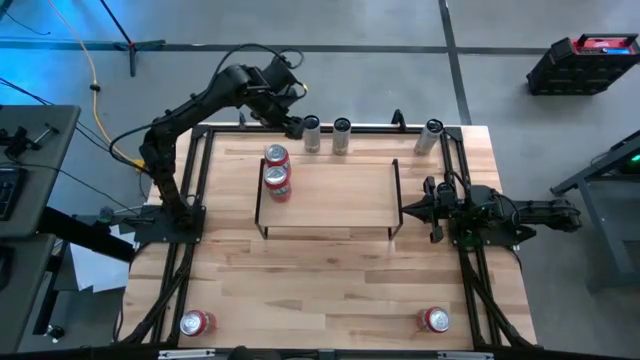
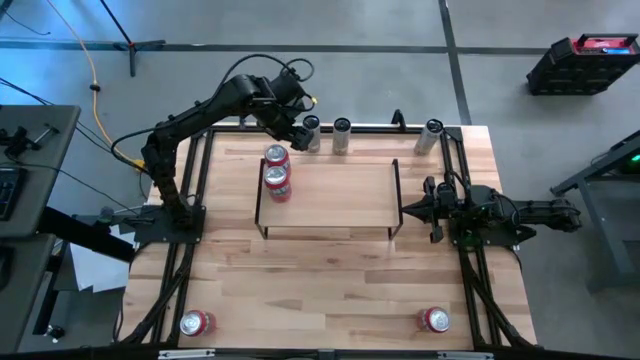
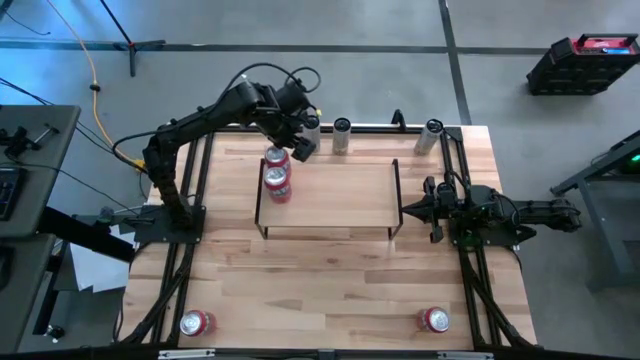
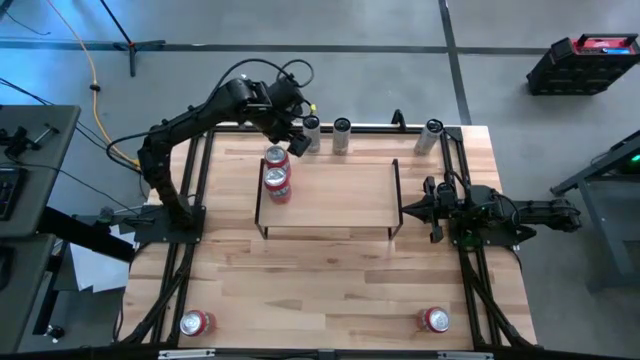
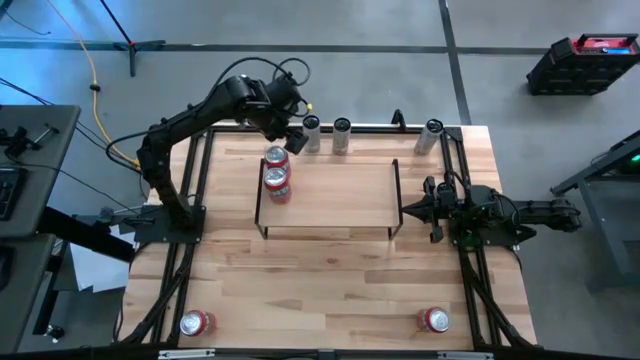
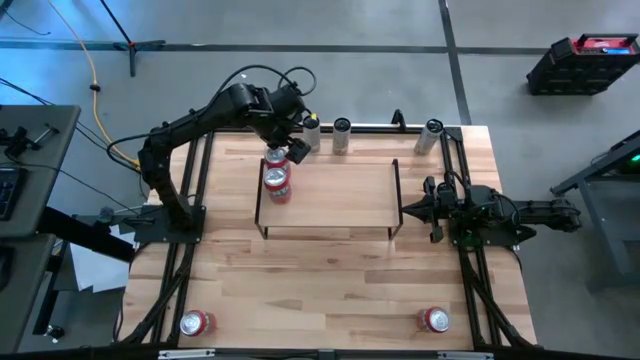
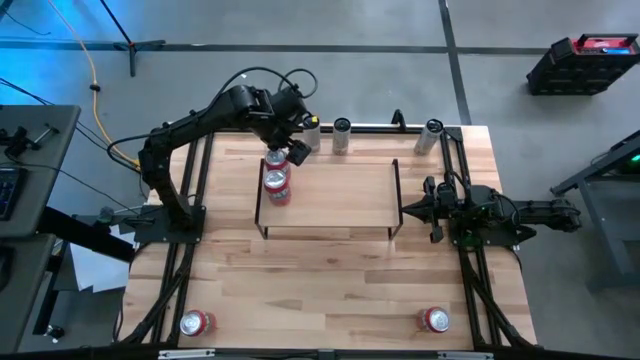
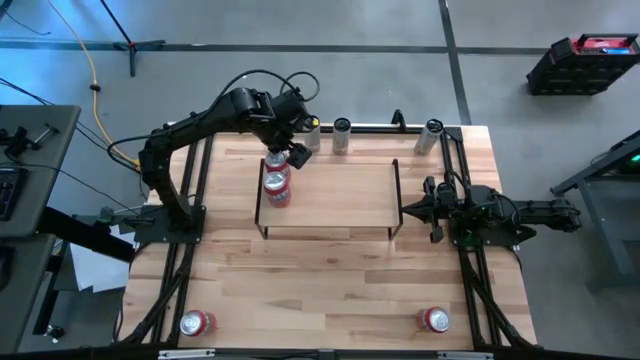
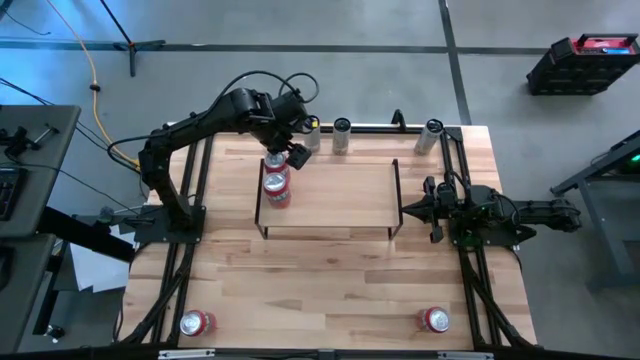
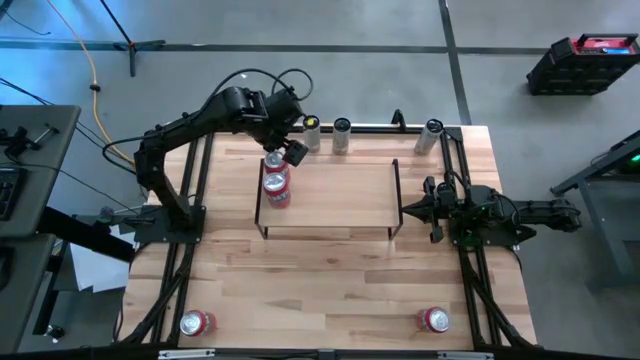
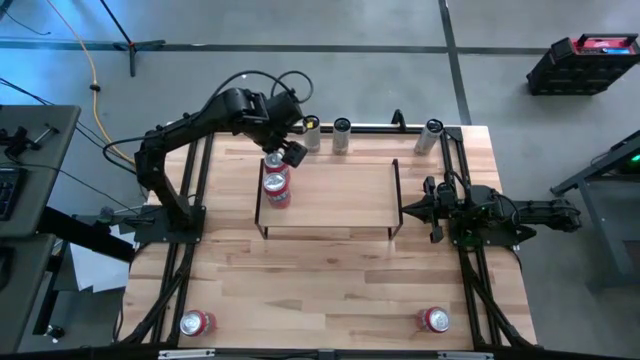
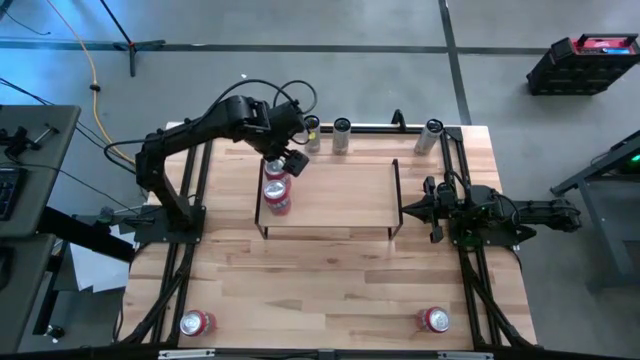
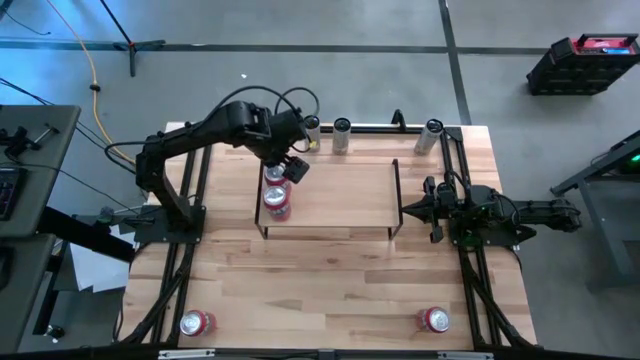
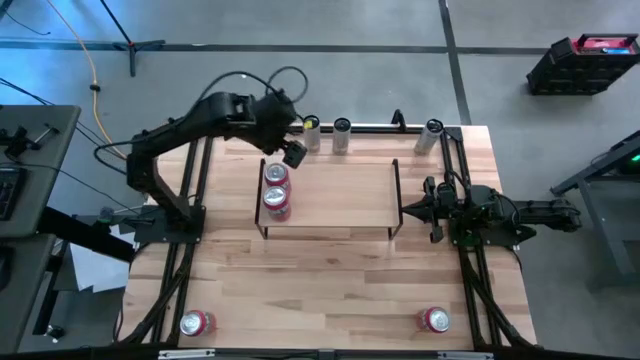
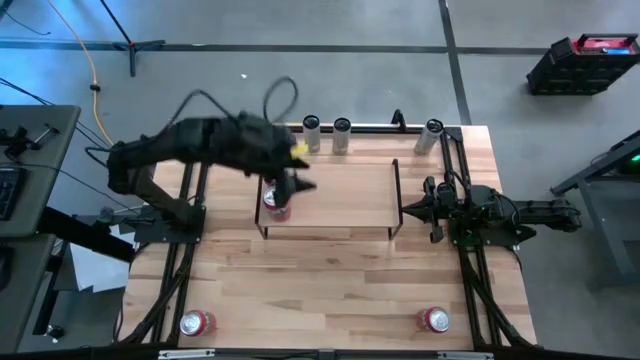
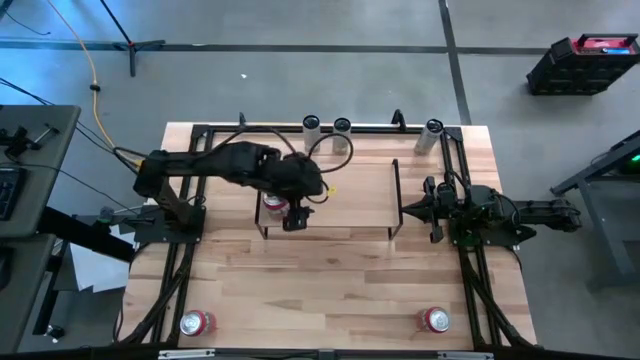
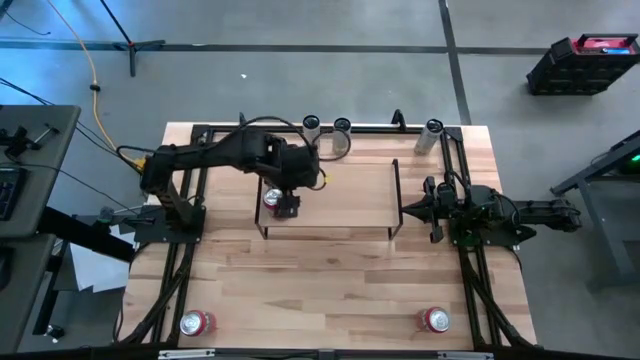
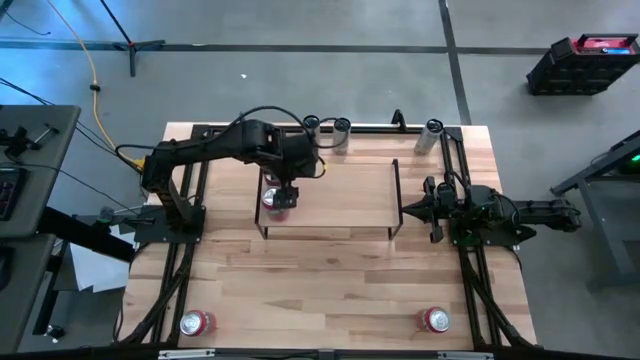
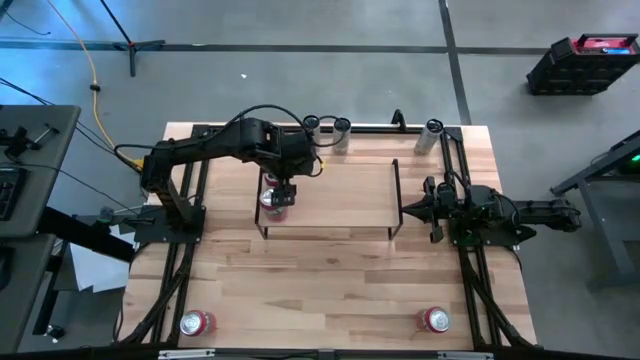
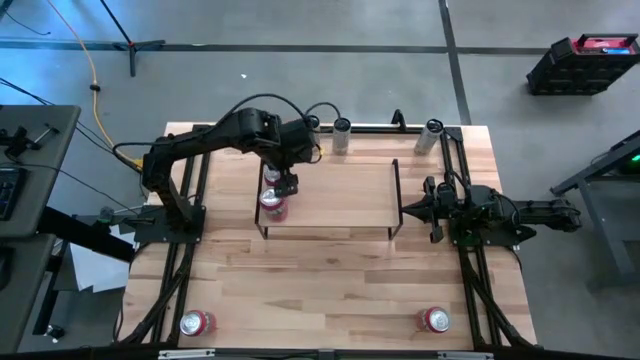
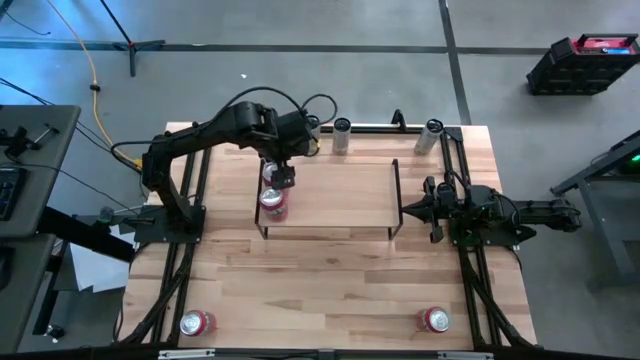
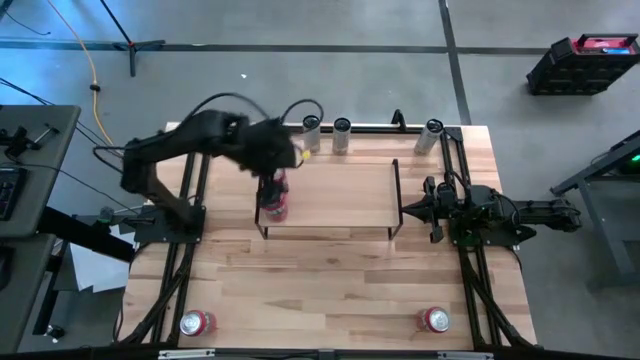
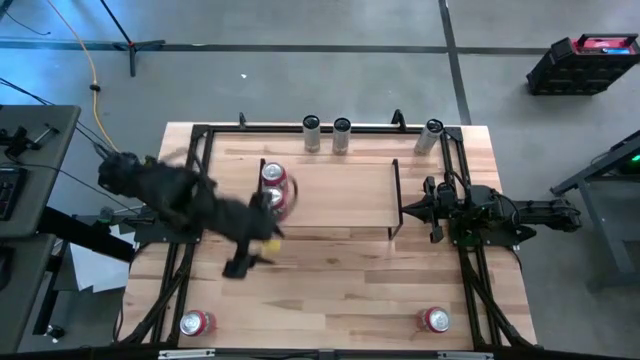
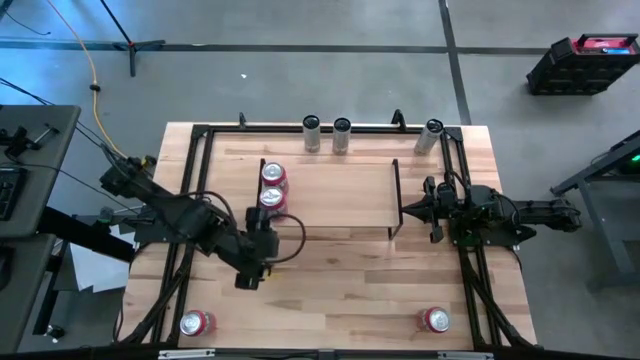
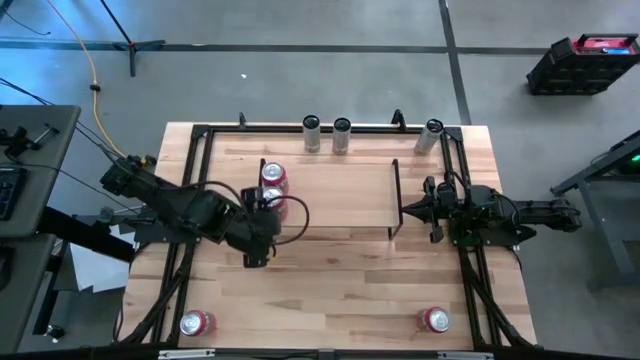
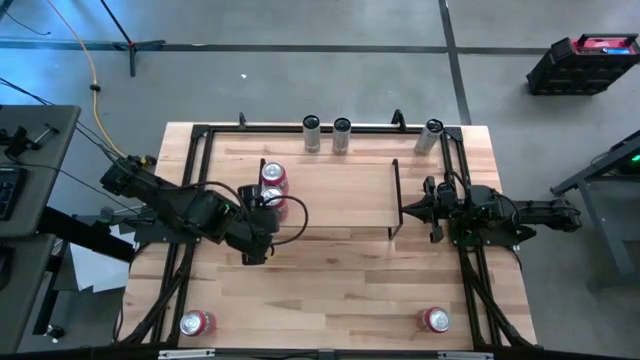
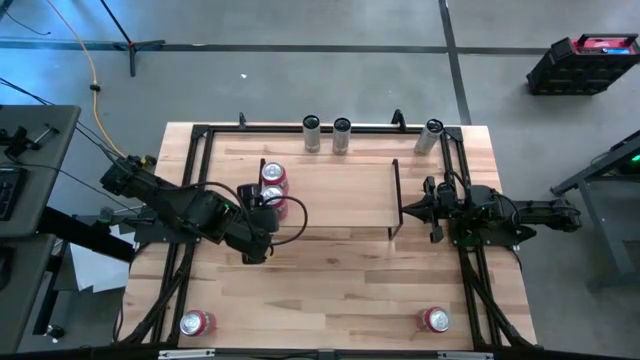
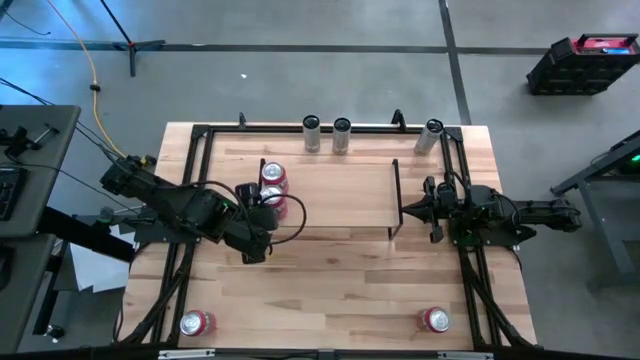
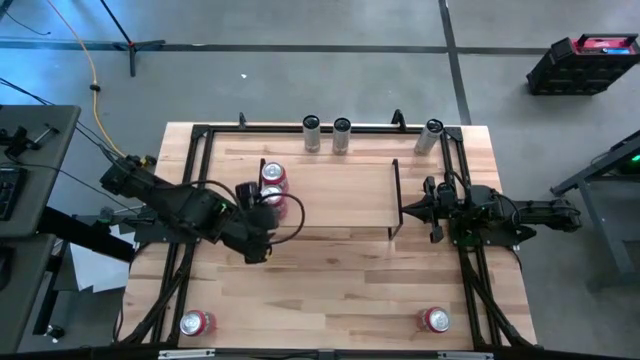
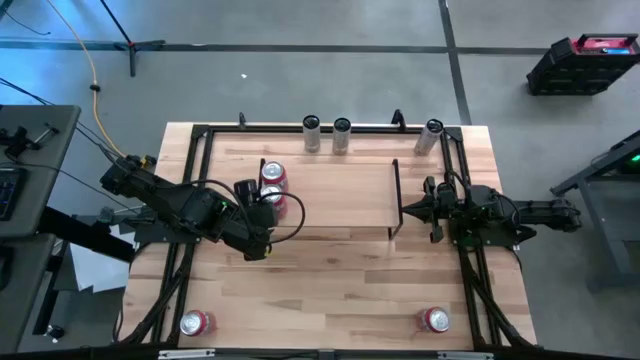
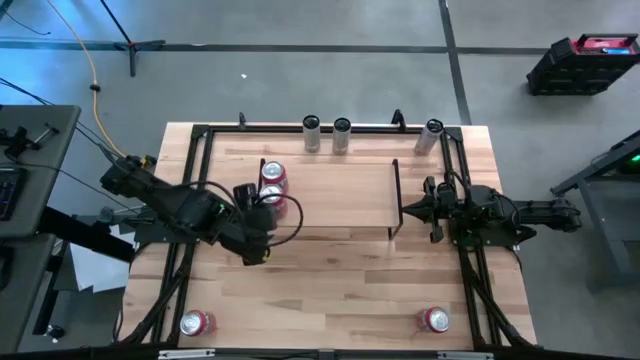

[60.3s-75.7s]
Task: Place canned beverage on shelf
Adjust the red soda cans on the shelf

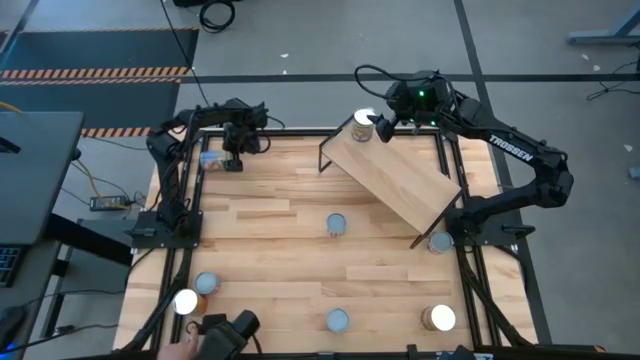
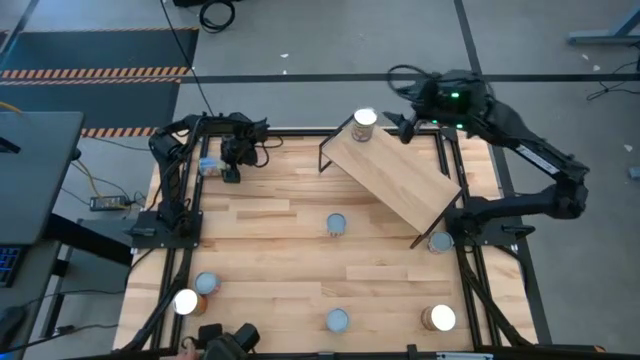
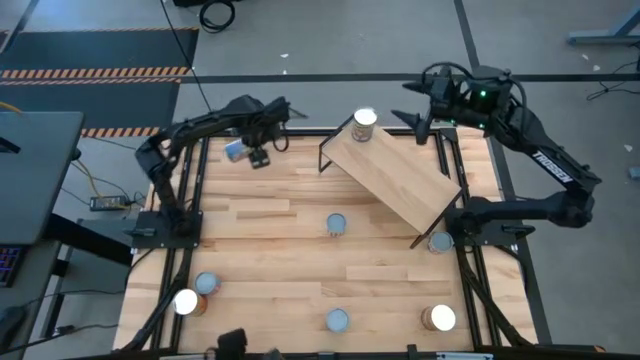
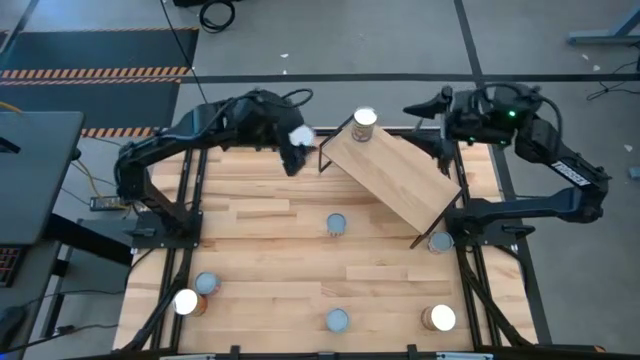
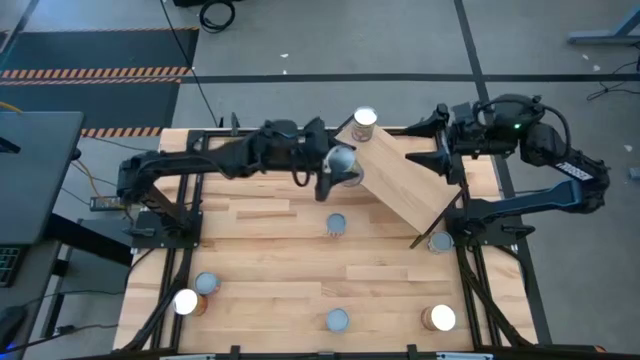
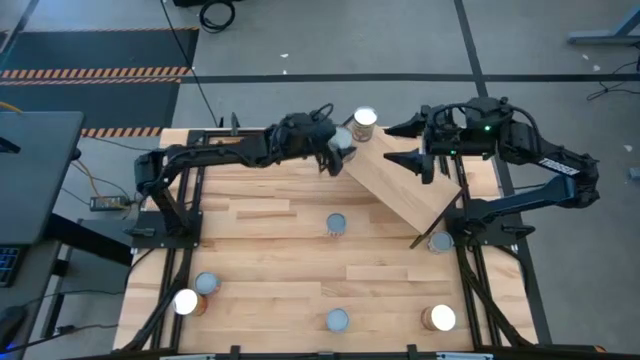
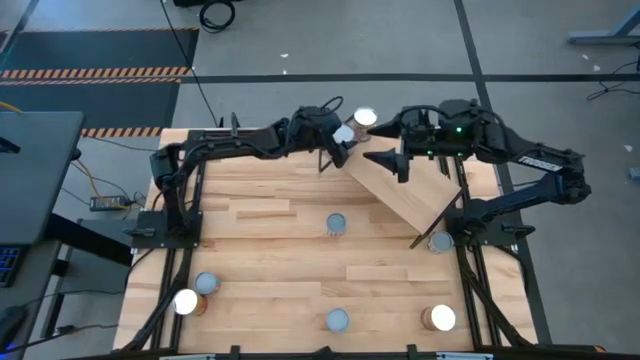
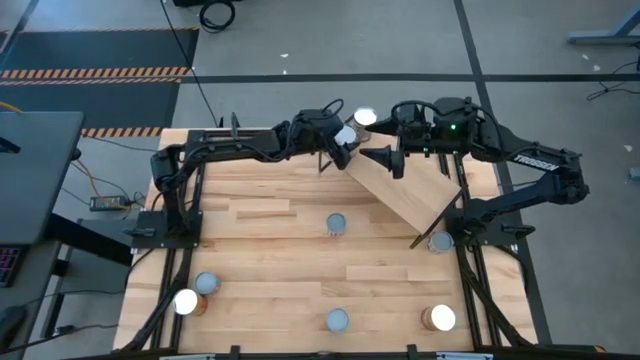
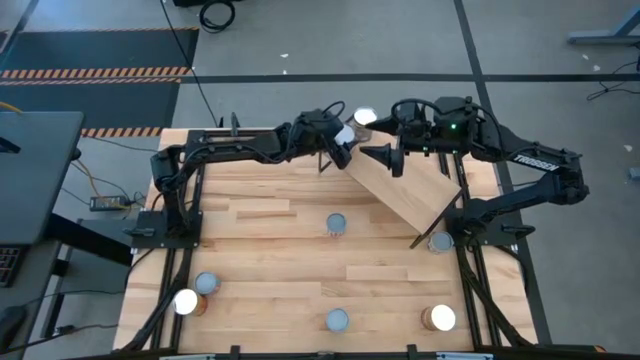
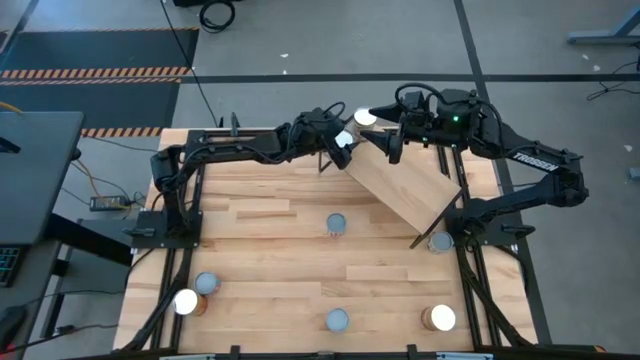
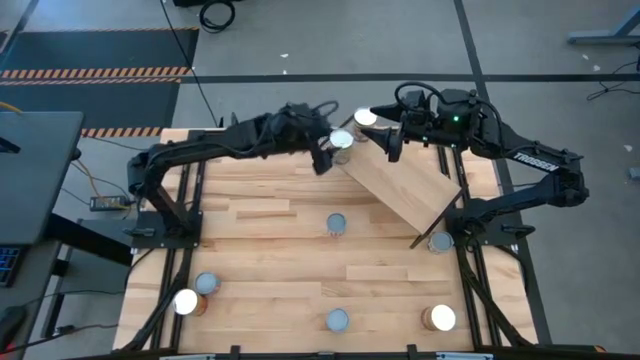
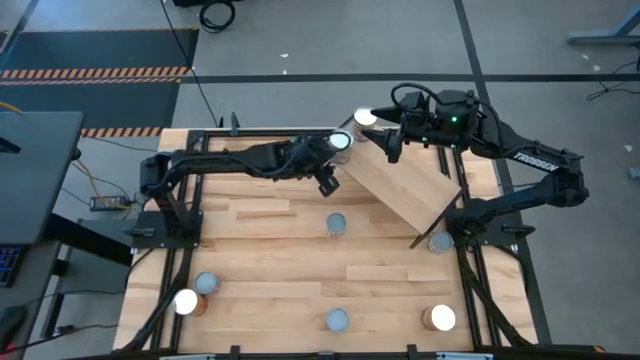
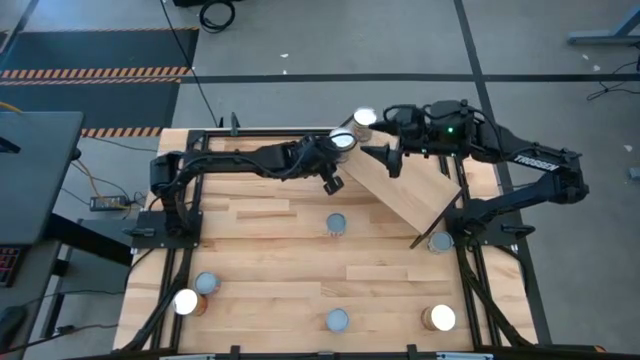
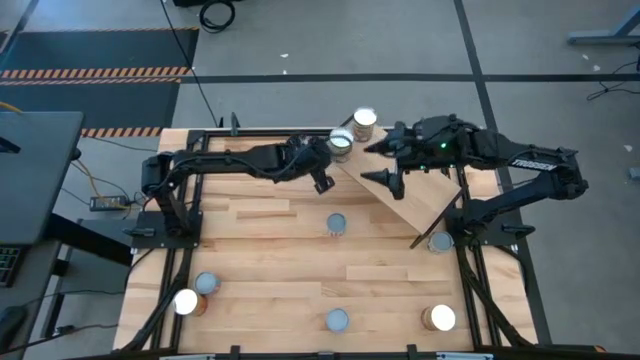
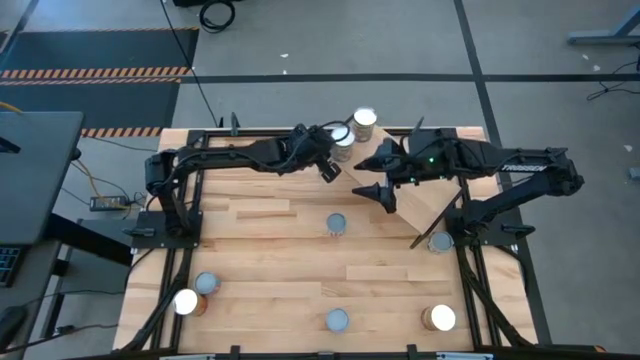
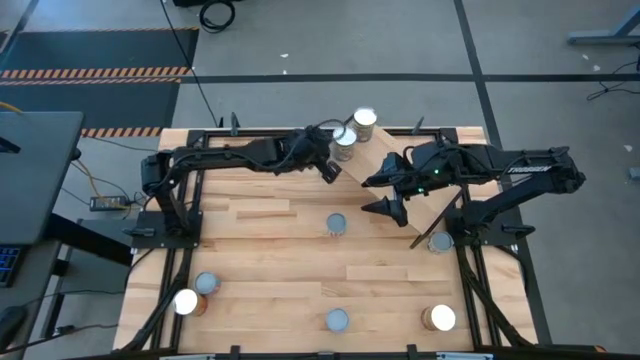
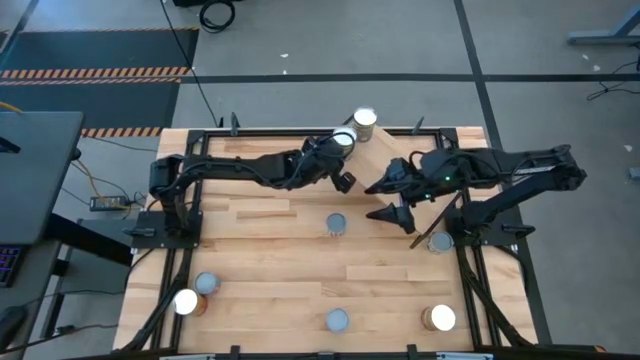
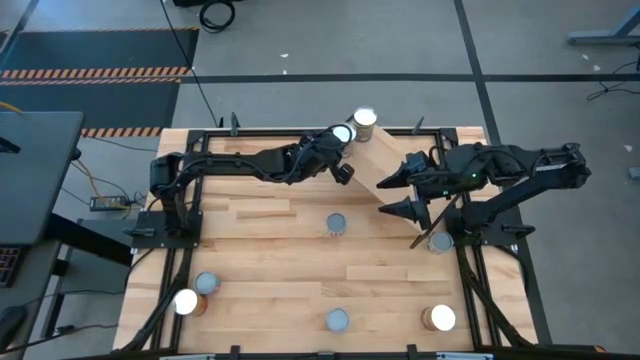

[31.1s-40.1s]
Task: Pick and place cans onto a shelf
Put the canned peaches can on the shelf
